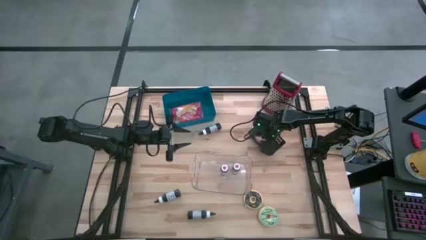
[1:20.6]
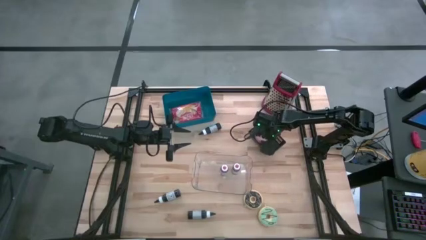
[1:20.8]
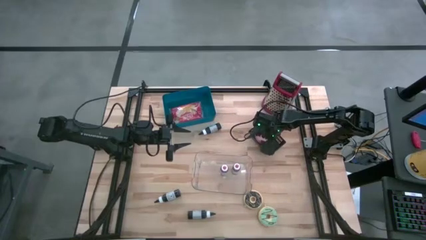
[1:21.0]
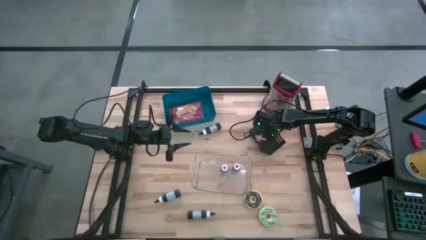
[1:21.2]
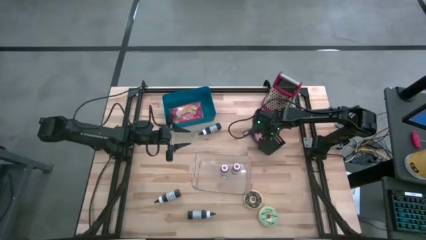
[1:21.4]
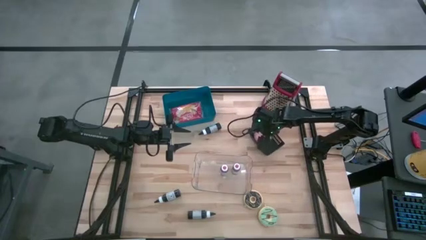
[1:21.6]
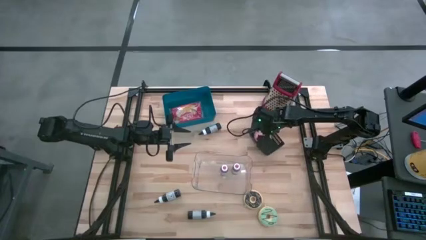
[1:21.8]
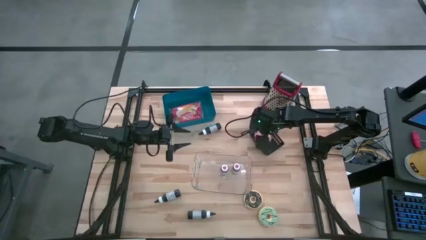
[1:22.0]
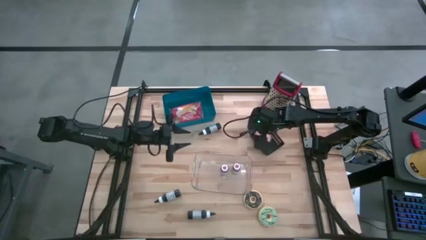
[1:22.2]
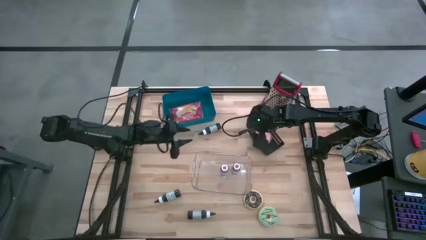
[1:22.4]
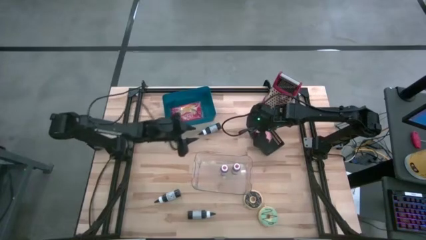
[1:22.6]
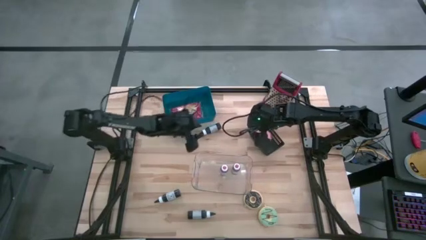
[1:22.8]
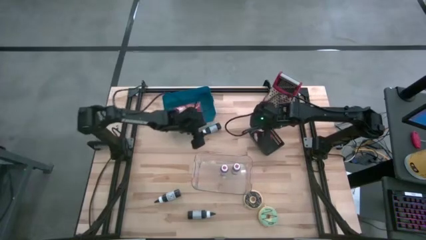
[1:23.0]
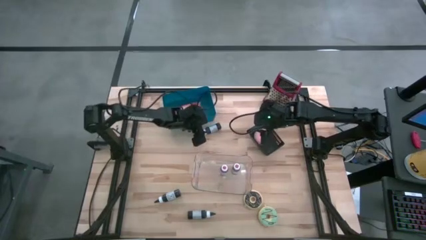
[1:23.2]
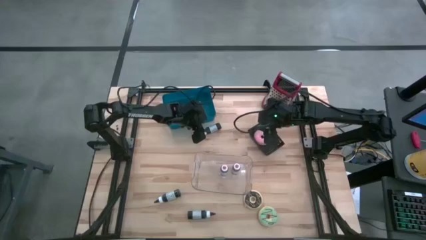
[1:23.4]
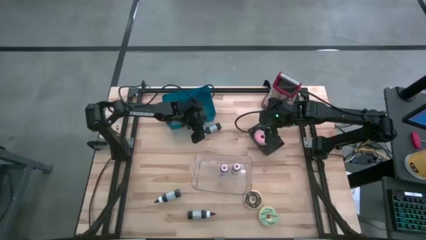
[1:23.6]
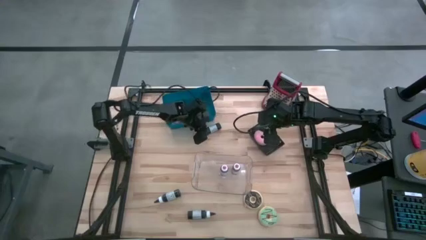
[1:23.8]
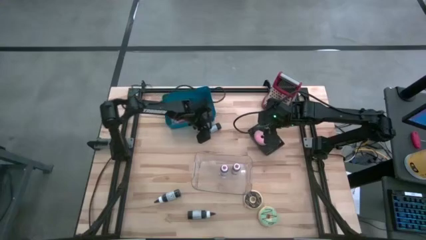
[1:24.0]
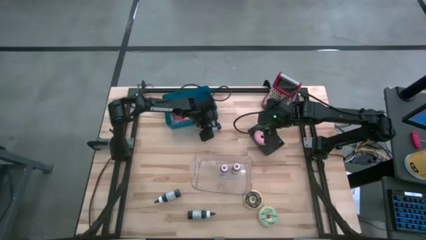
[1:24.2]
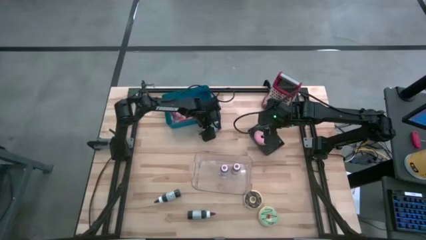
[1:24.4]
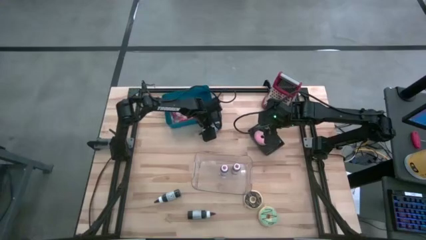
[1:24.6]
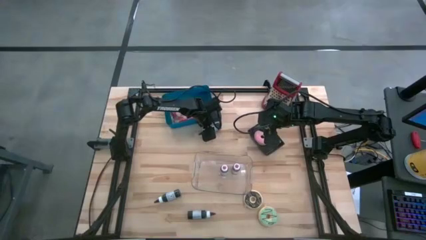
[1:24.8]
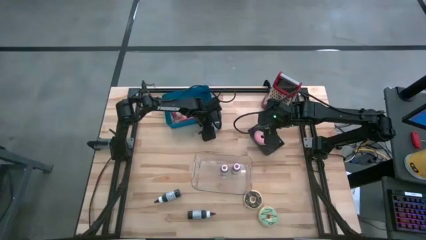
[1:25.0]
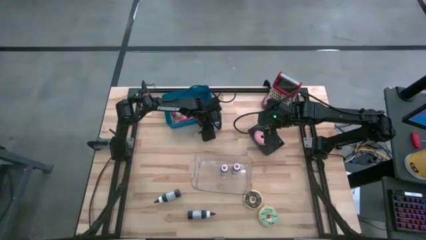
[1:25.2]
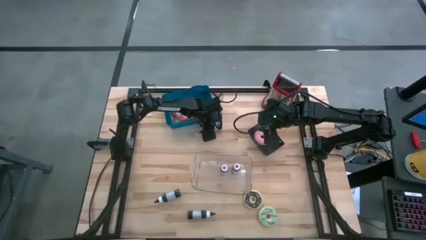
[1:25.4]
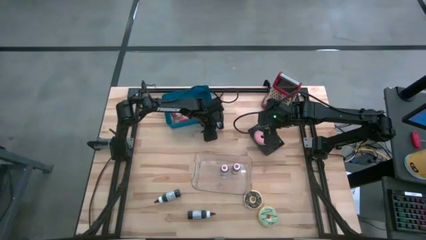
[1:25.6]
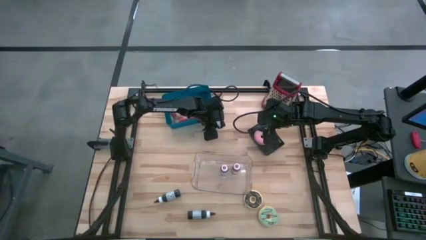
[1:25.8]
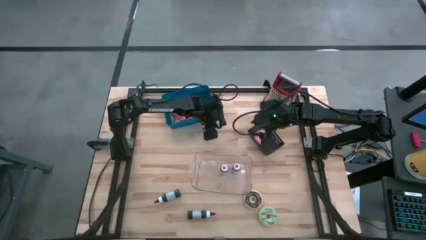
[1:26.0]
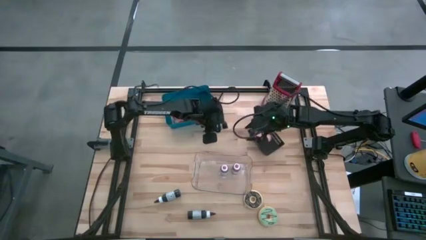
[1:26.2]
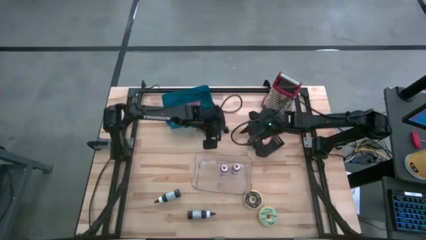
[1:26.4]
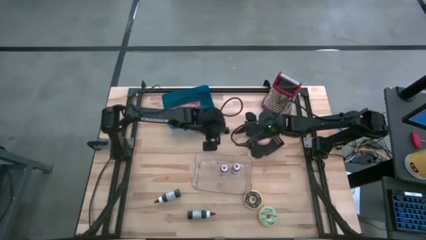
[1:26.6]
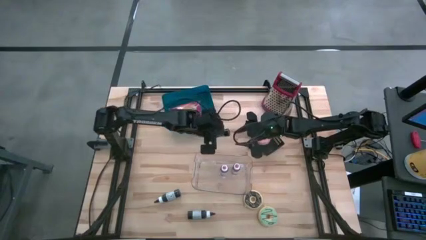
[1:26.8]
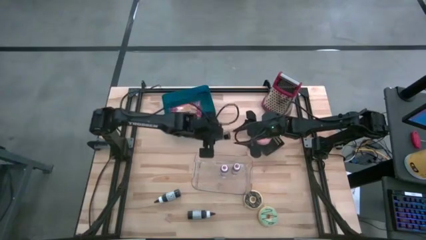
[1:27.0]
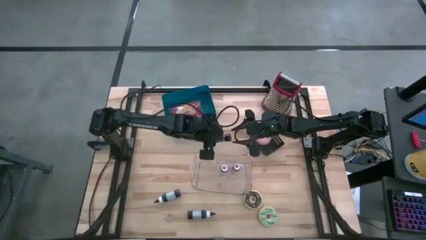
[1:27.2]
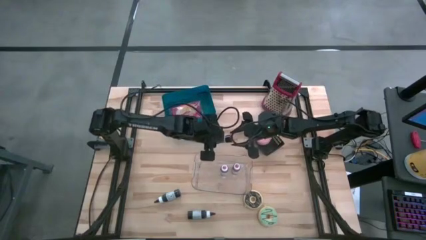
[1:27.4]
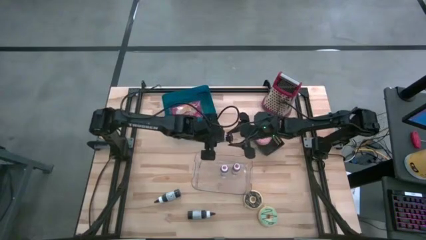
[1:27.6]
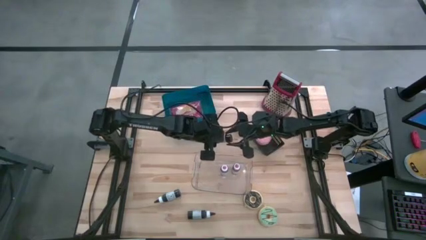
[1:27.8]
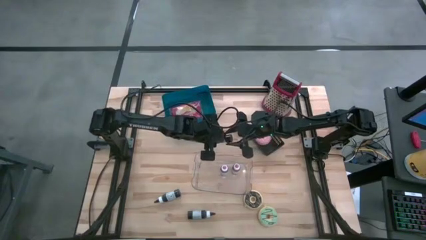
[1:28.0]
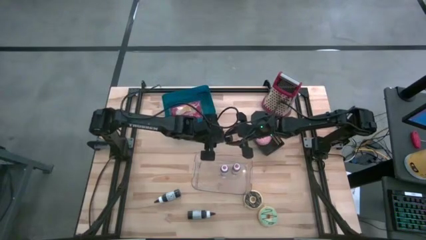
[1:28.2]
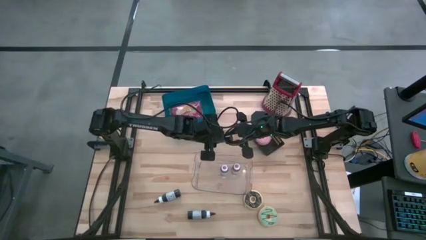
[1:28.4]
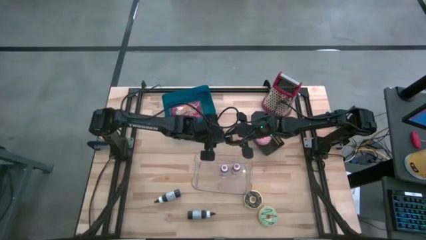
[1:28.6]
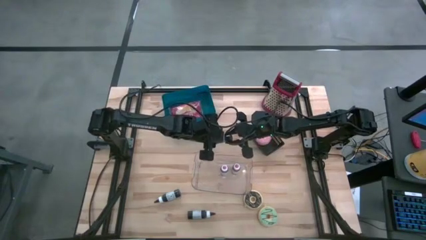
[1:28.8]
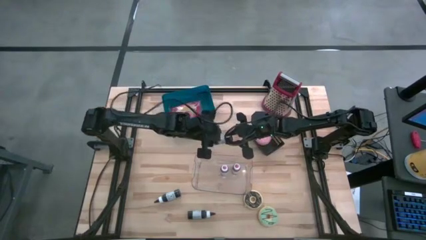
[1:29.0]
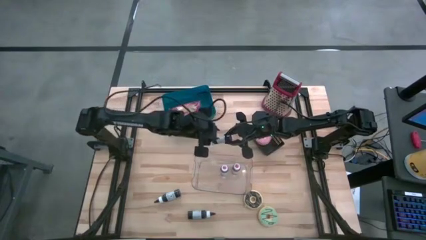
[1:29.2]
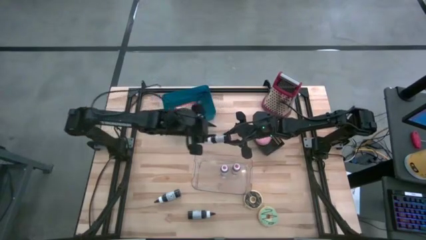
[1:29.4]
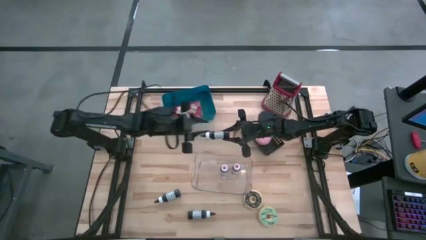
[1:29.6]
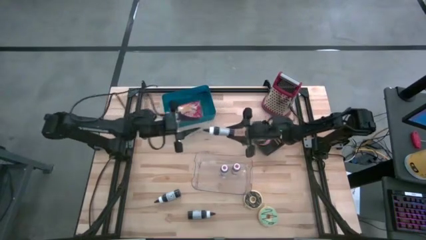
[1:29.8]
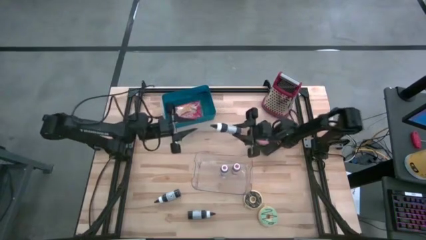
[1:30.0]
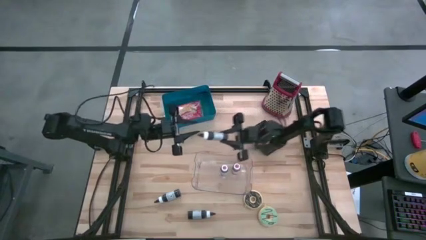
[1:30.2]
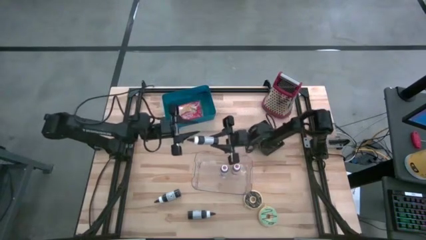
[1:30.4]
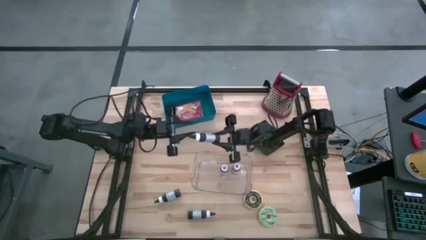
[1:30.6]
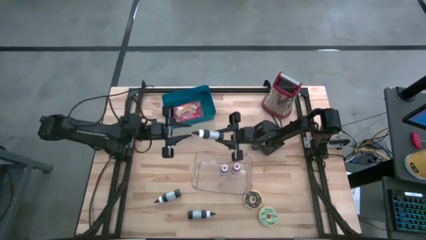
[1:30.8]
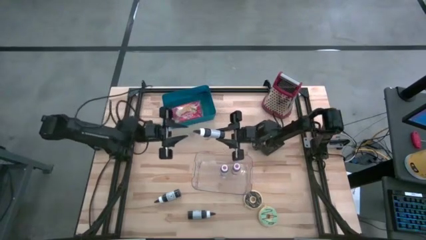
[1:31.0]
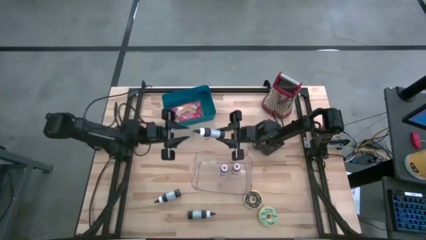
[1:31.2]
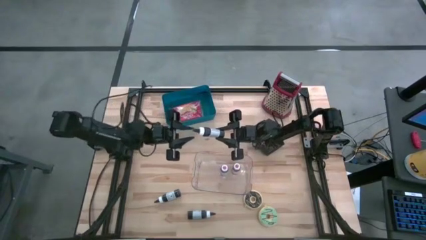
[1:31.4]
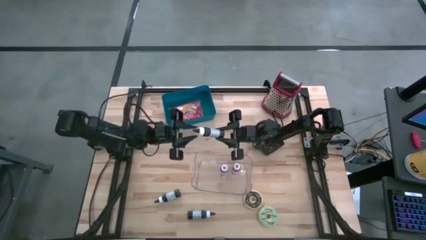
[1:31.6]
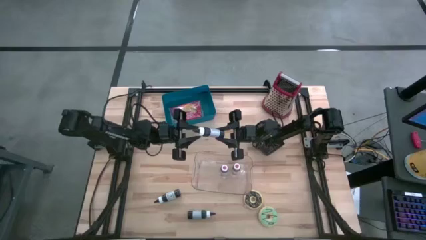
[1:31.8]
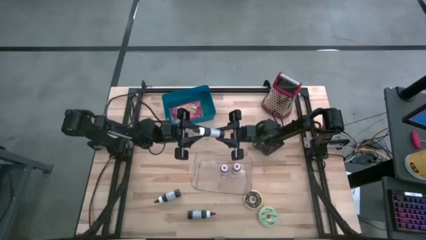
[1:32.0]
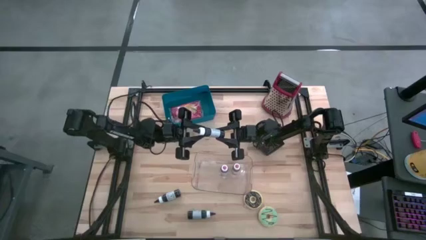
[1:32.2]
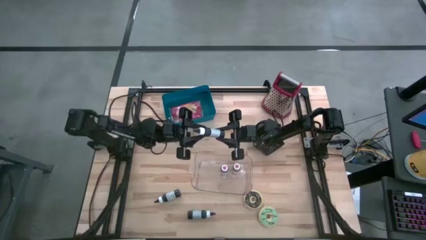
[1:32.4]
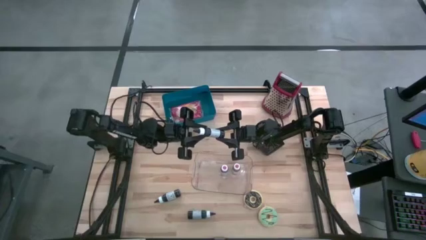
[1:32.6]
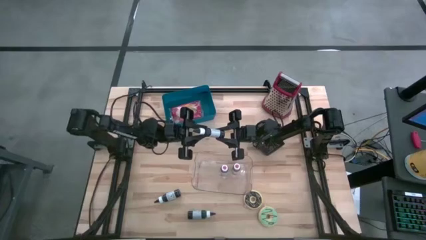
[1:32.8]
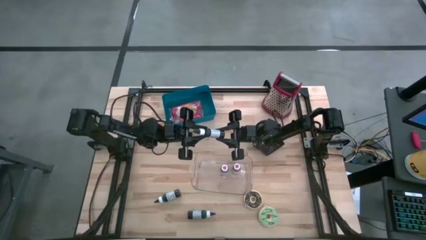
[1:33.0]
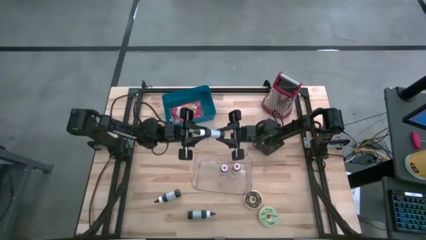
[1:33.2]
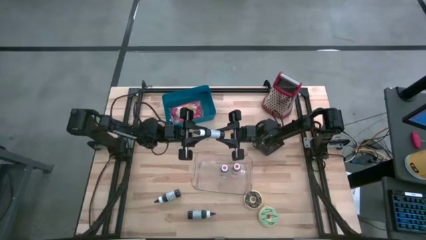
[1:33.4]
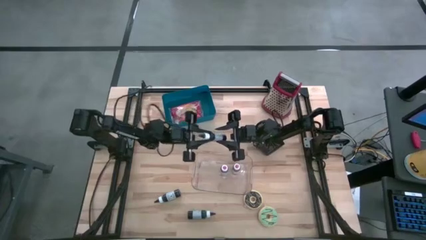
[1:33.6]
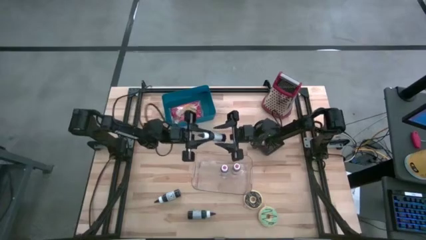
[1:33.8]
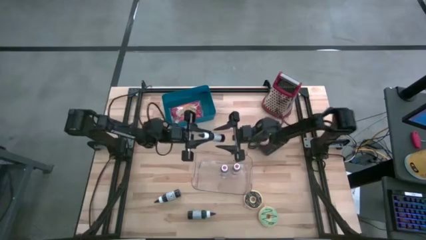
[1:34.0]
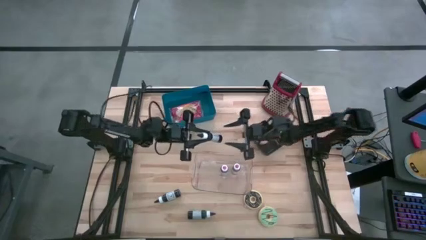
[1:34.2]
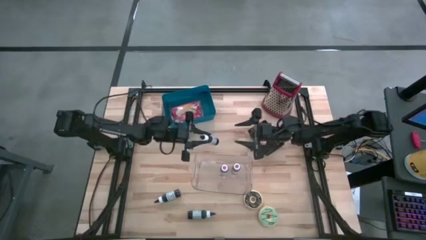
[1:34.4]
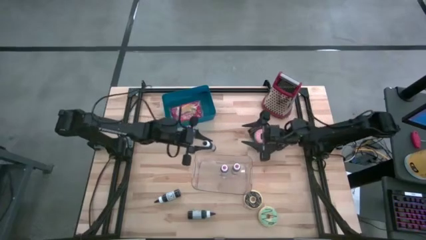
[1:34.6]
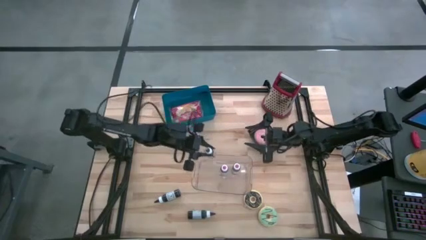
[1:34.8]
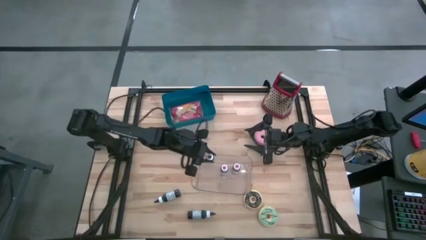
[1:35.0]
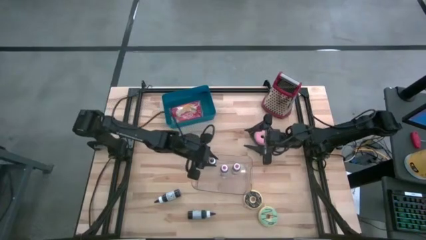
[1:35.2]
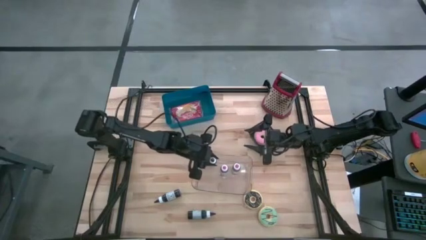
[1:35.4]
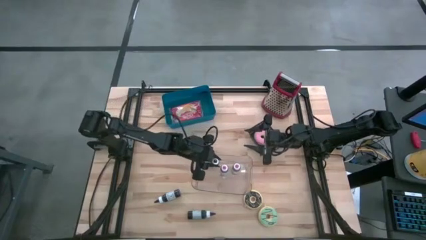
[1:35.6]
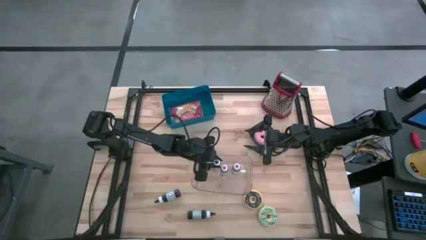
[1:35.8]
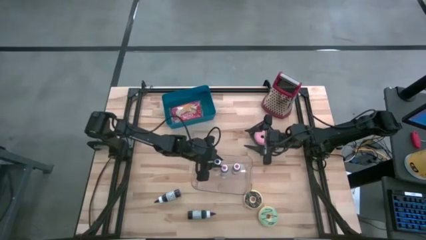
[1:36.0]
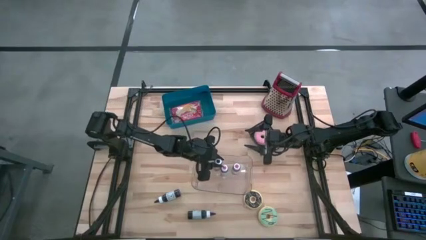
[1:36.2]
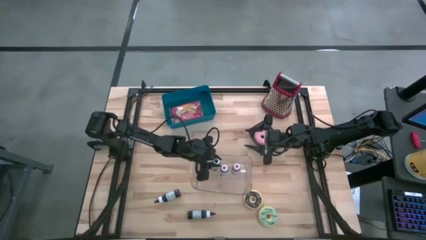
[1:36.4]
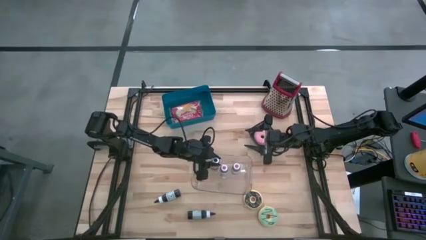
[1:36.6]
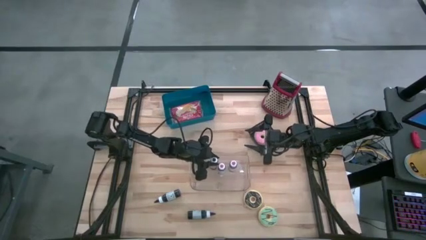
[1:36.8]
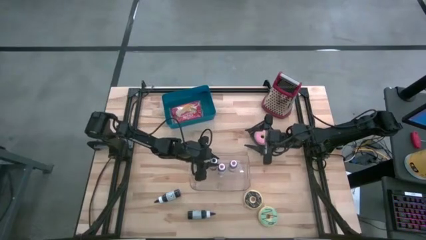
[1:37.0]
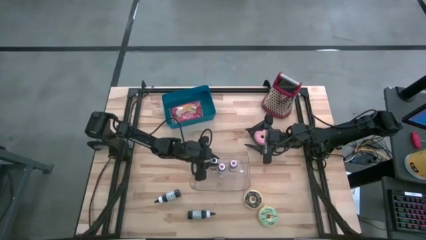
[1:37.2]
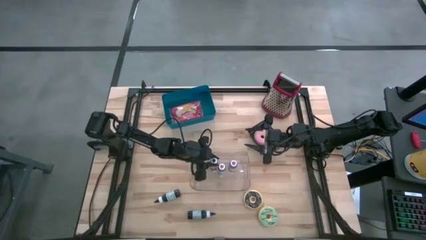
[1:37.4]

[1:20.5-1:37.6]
Put the top black food coloring bottle into the transparent bin
